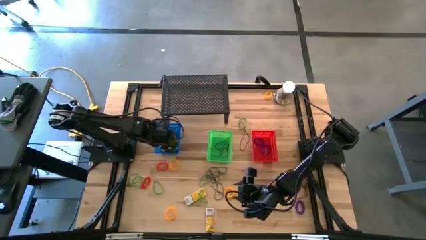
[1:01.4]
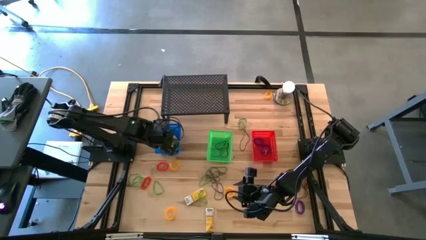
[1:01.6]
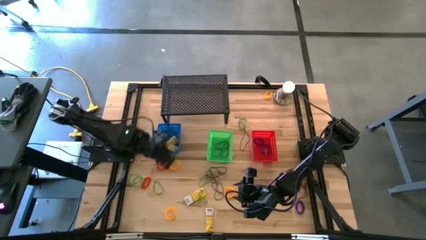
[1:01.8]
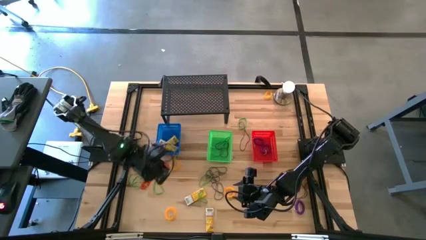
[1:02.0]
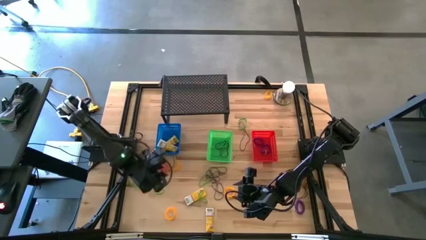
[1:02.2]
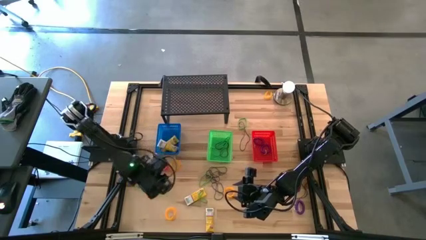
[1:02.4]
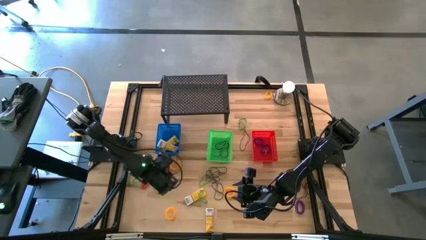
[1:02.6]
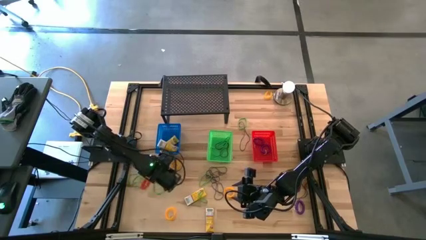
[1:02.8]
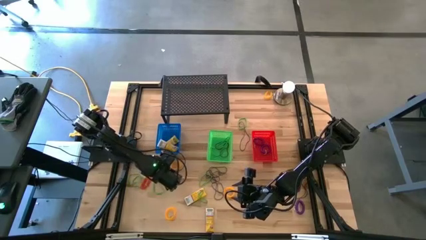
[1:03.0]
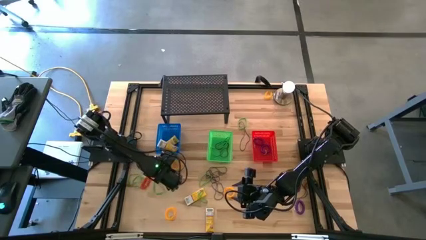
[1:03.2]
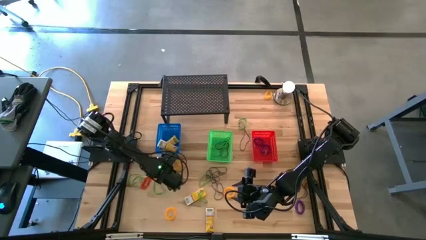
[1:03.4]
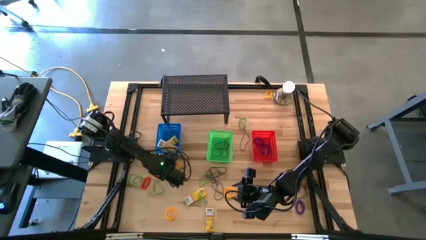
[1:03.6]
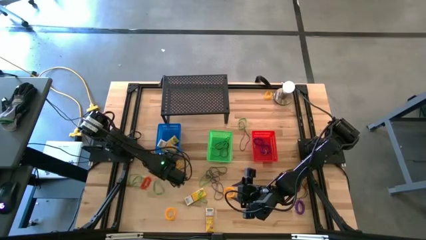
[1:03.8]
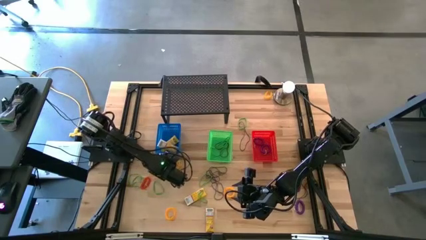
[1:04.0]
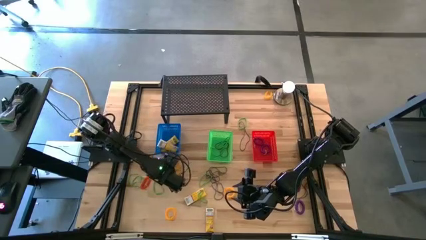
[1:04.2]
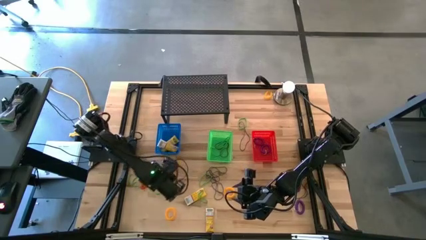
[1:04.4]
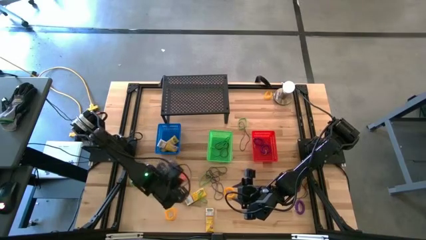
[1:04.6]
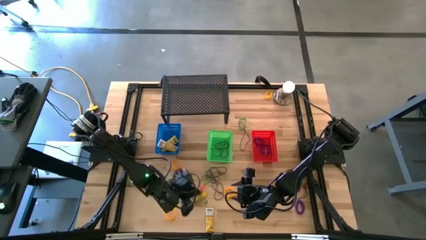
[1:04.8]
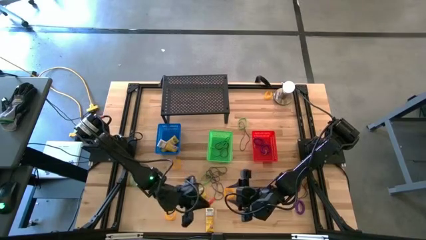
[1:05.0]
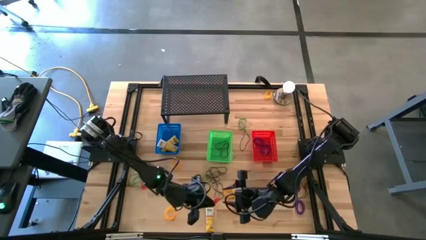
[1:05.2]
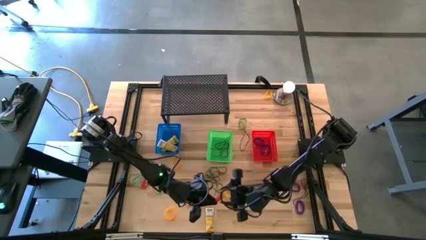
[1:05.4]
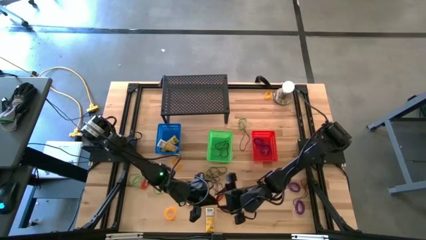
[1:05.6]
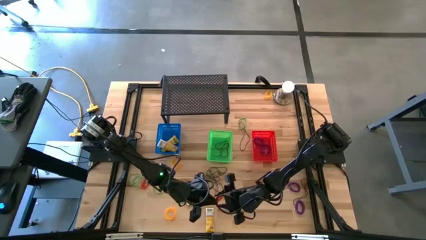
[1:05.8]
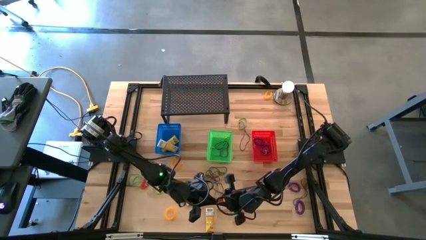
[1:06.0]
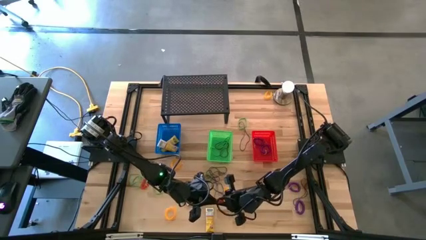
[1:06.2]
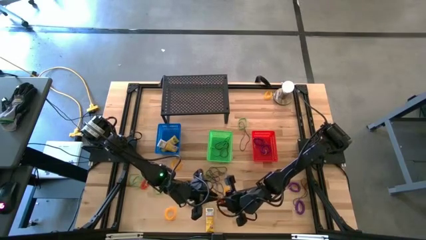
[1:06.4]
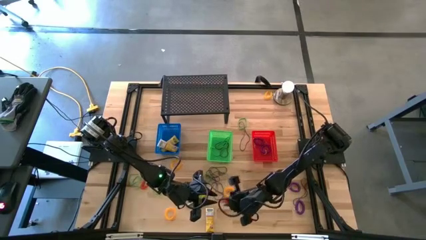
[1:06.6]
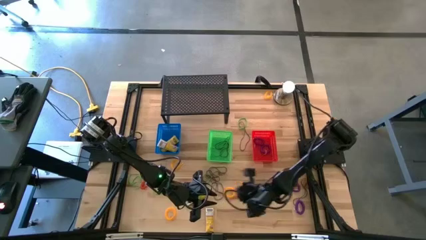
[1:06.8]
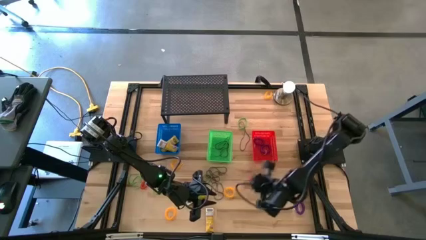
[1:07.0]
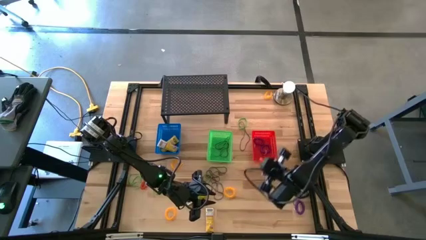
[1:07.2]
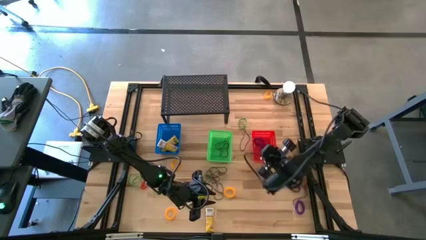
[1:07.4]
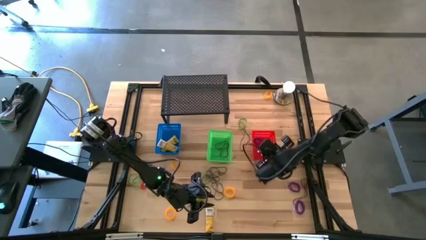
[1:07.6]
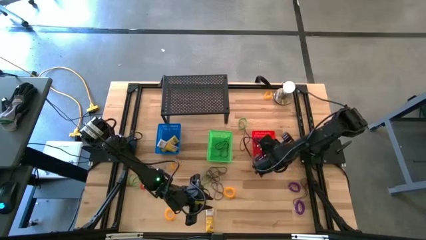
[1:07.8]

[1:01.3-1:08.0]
Task: Pick & Place Office Desk Supplies
Put the orange spring keychain into the red bin

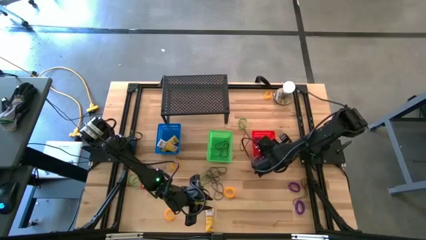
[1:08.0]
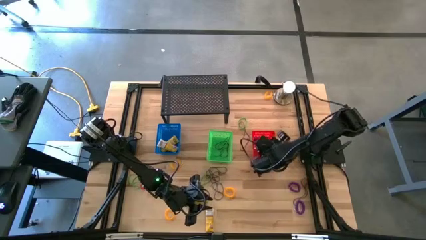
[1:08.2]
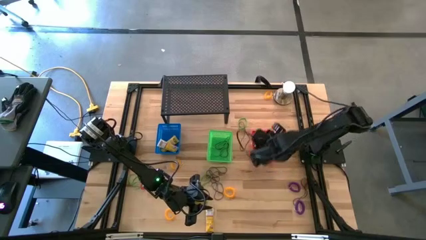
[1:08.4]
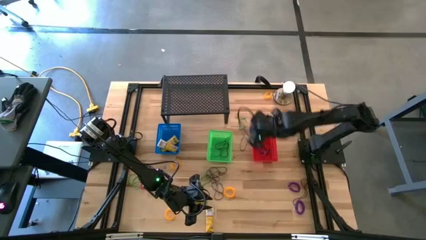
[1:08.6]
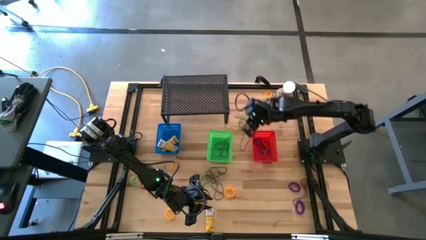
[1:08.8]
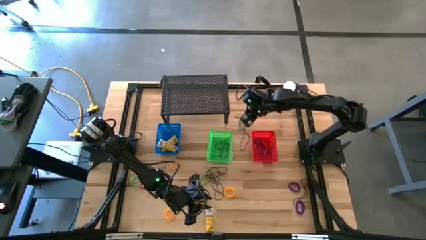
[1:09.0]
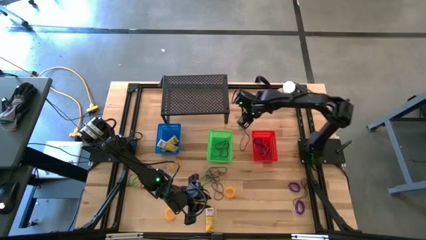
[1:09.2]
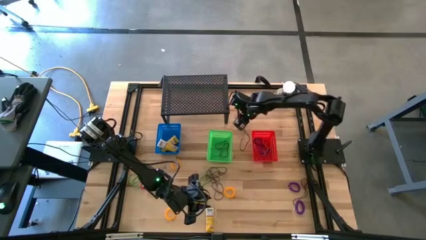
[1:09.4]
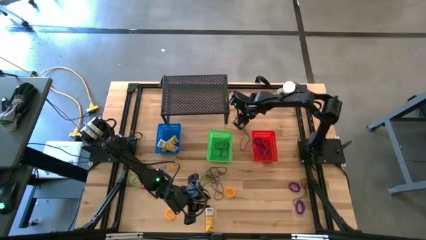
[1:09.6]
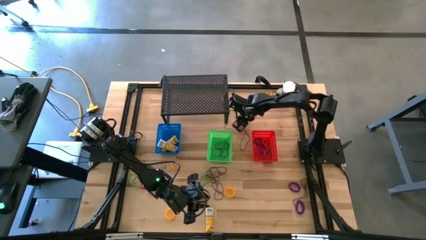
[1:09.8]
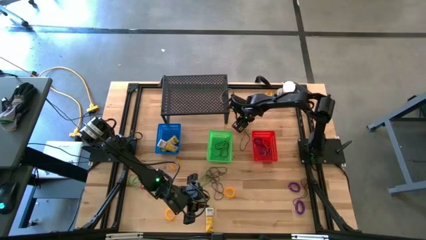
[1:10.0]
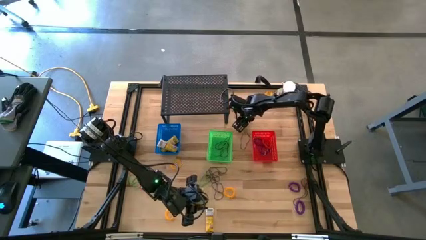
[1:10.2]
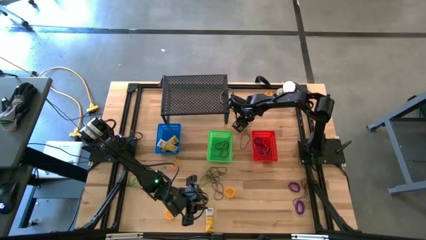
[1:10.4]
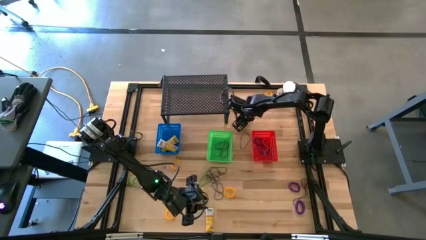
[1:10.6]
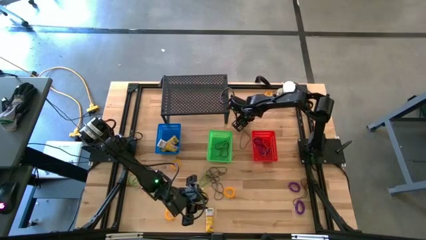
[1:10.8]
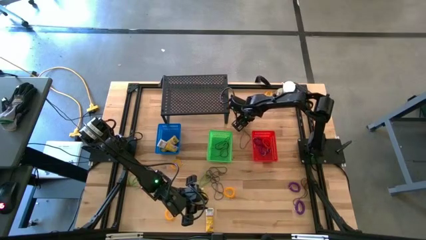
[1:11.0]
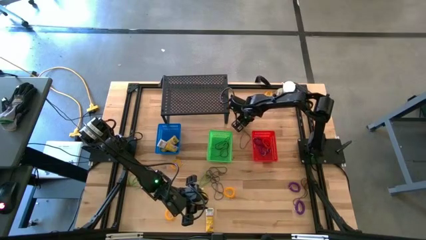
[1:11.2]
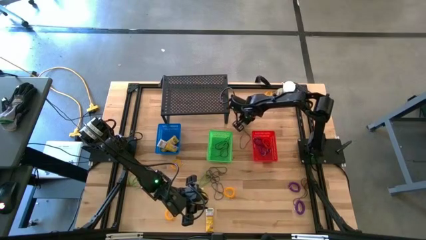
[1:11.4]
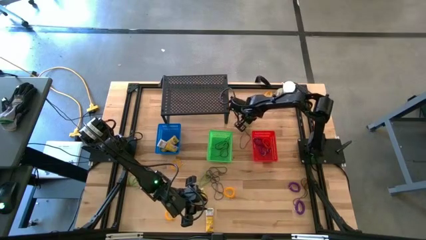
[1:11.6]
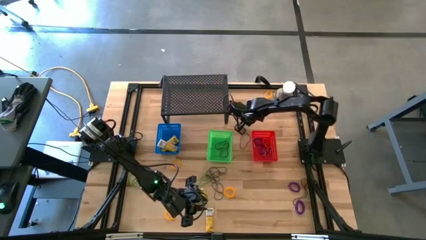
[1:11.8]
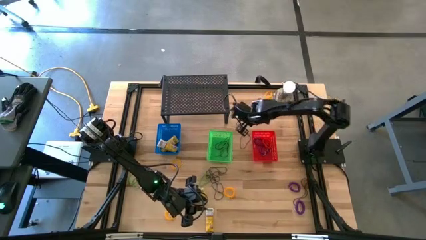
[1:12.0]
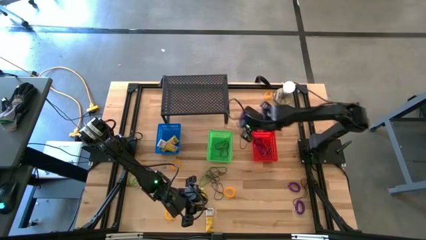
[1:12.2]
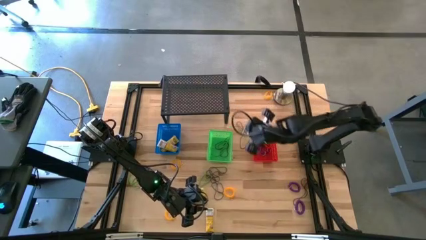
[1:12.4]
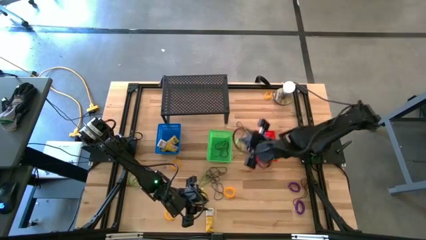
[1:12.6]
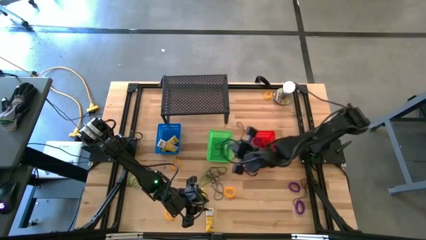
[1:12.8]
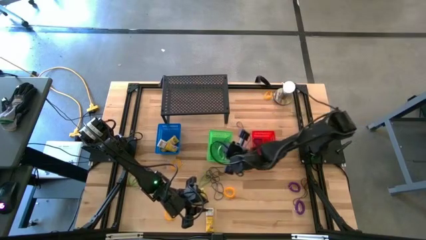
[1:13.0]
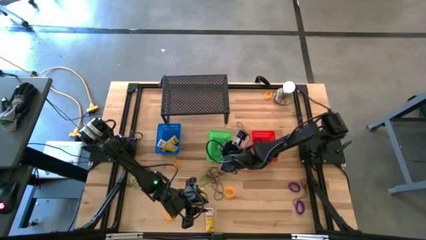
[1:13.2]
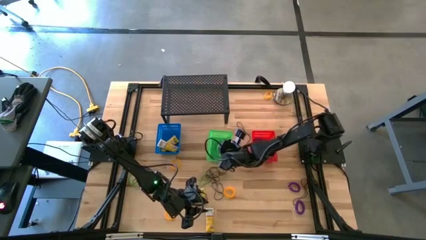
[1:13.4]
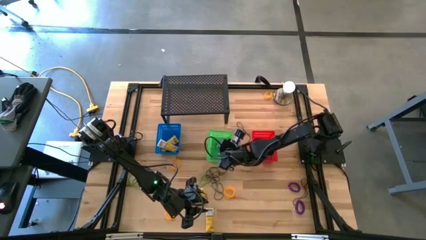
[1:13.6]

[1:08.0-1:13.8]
Put the green rubber band into the green bin

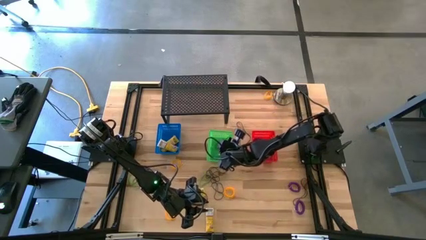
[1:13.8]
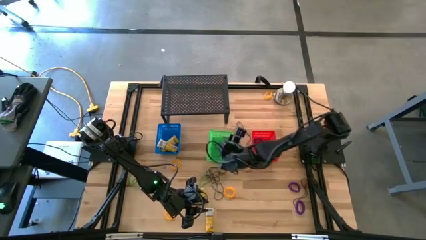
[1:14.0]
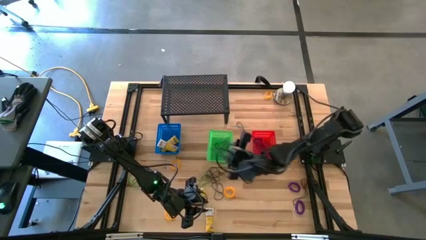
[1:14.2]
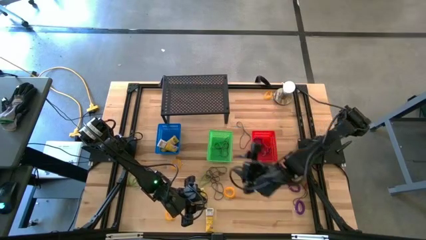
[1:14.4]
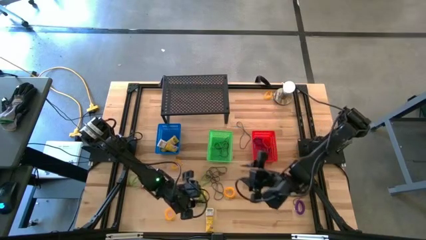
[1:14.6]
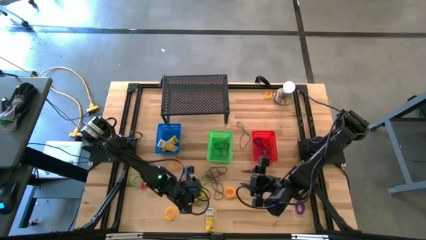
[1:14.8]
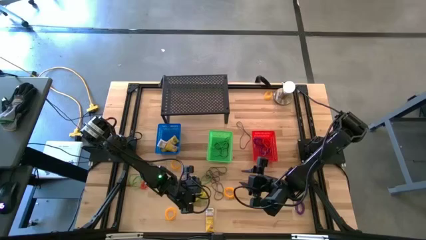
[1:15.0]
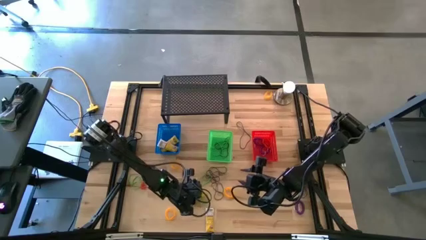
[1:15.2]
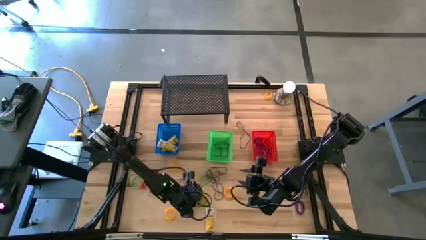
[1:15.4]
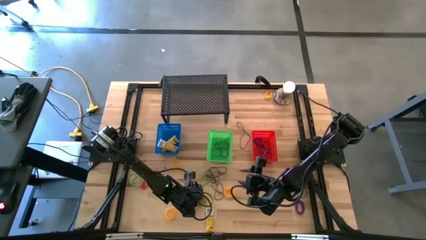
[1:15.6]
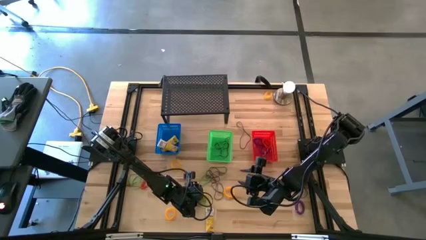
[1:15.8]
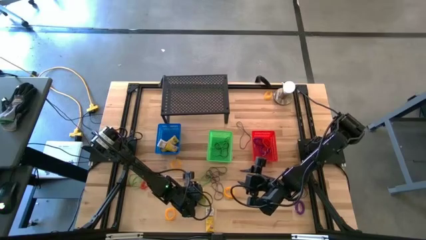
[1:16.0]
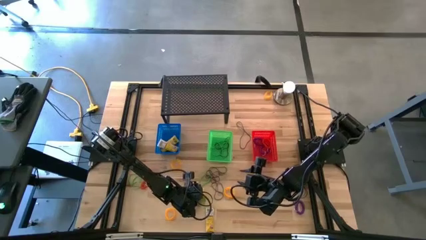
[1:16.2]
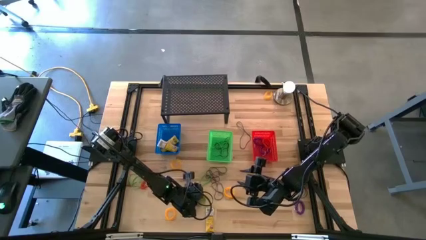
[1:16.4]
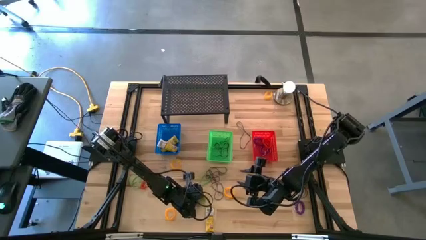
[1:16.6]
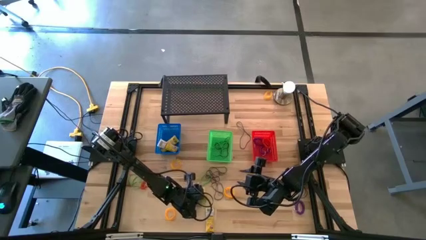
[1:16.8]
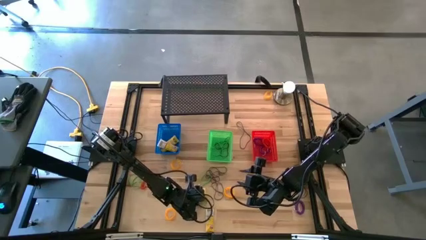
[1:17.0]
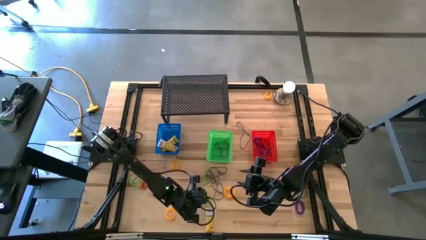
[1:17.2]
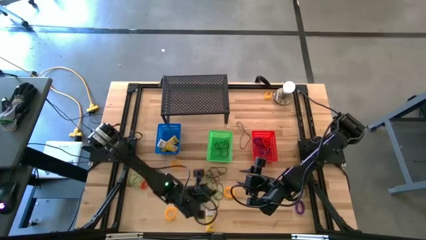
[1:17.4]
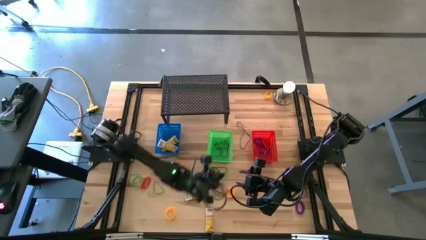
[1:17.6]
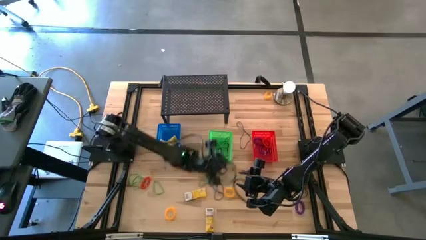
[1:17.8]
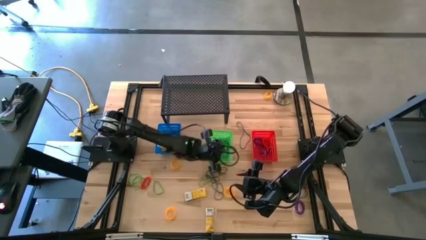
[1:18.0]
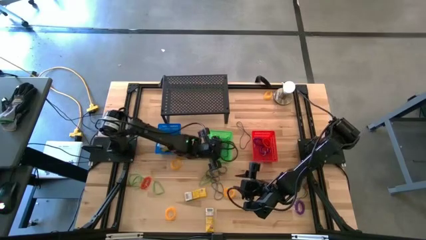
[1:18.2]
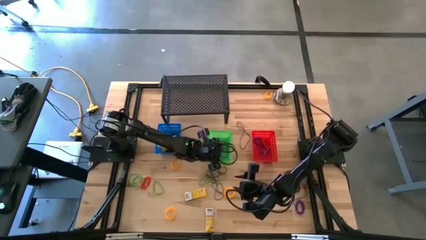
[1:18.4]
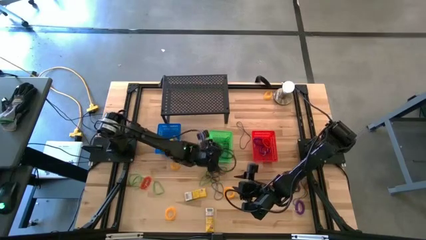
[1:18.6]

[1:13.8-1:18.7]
Put the green rubber band into the green bin
